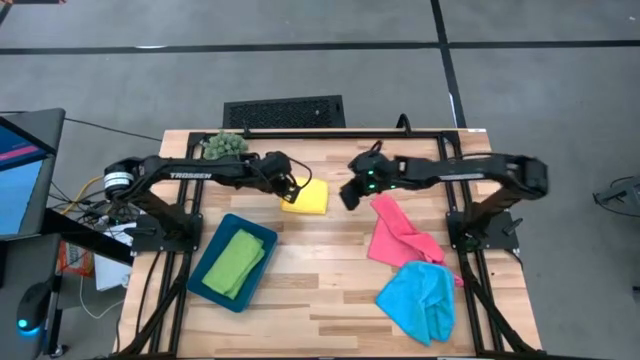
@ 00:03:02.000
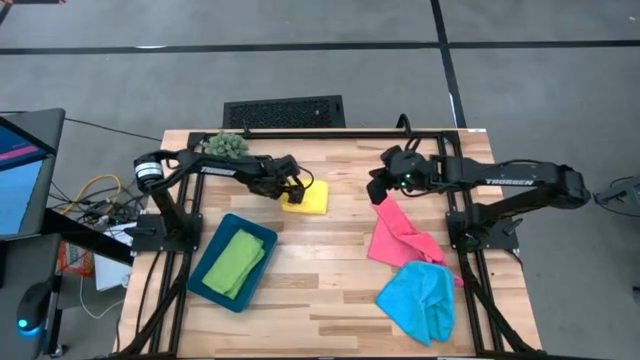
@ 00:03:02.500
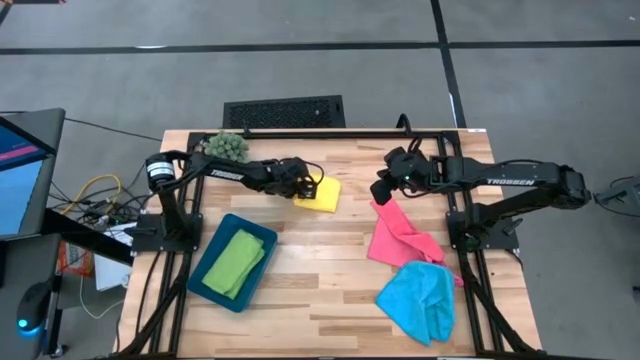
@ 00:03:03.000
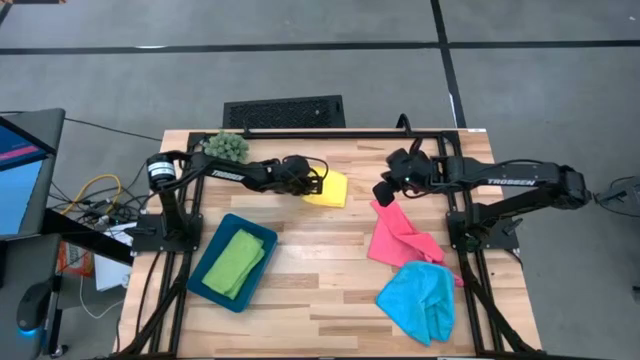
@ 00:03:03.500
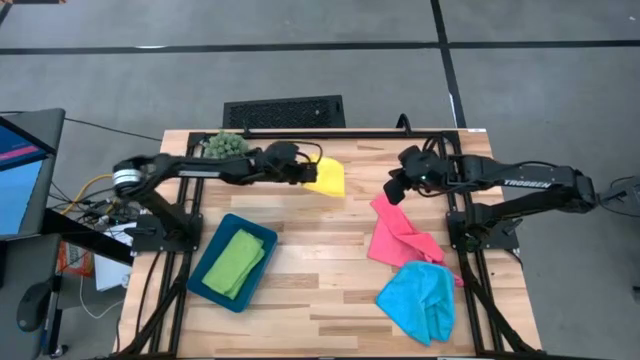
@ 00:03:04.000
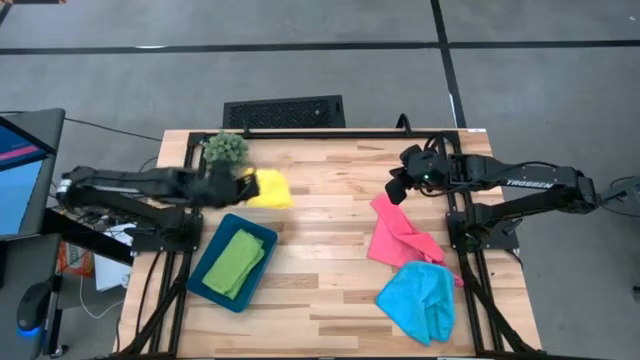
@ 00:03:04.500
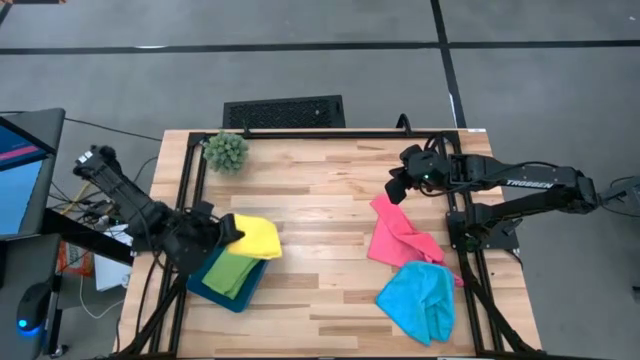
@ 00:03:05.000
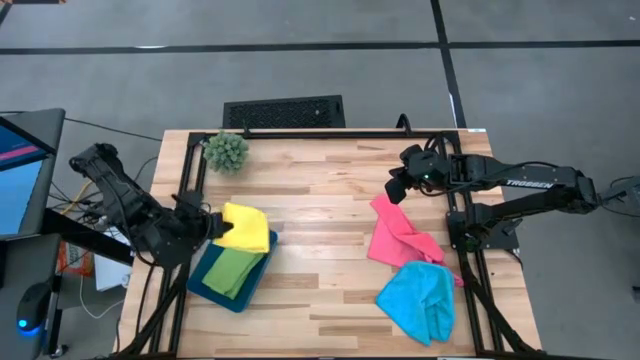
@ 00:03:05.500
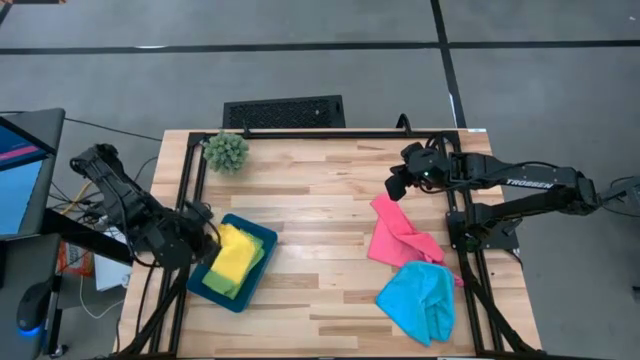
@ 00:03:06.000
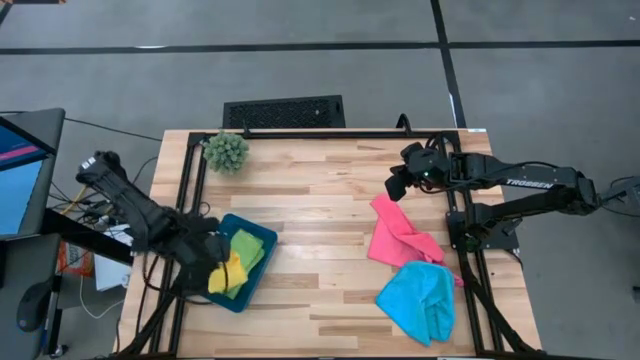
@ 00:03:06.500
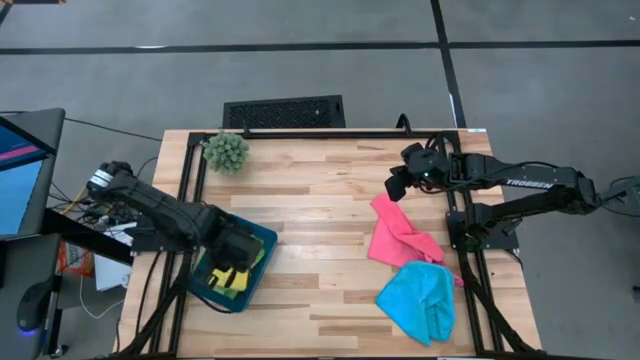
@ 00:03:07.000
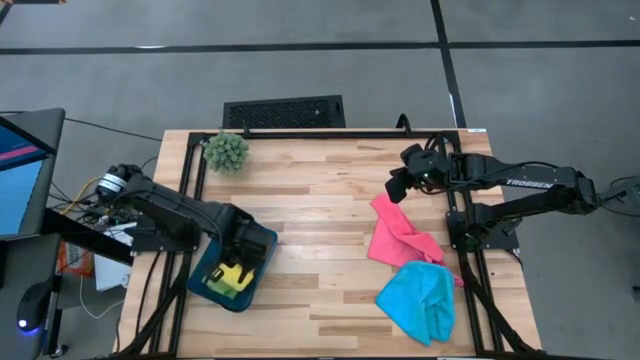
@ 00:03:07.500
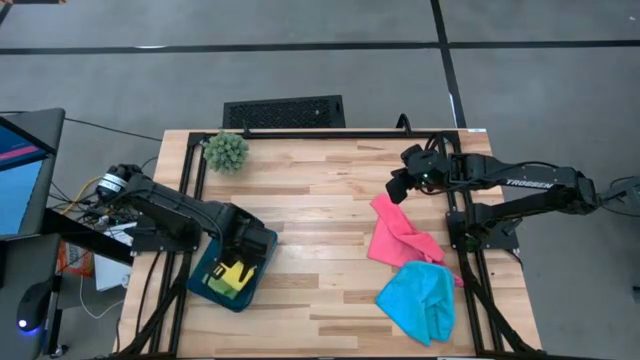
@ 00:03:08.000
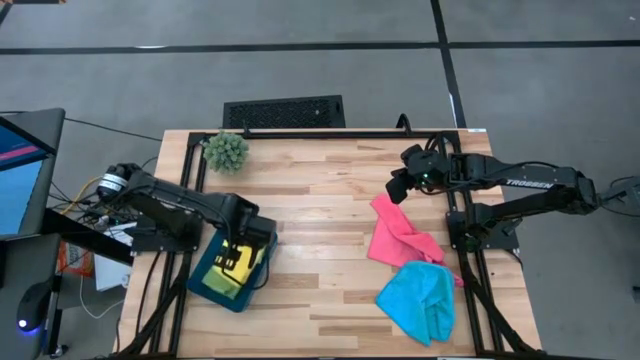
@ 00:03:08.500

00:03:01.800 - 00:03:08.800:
Task: Fold microfiber towels
Put the yellow microfiber towel into the blue bin

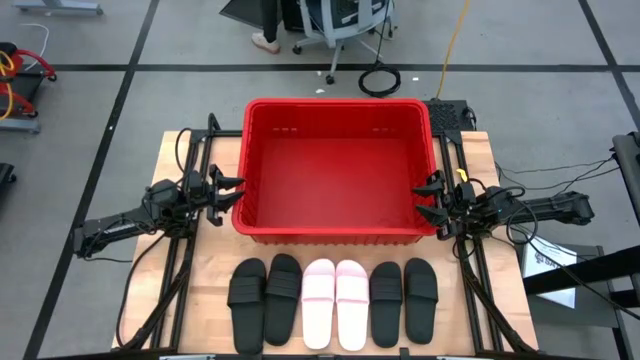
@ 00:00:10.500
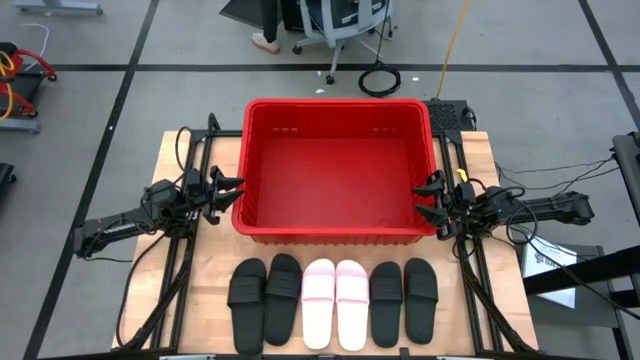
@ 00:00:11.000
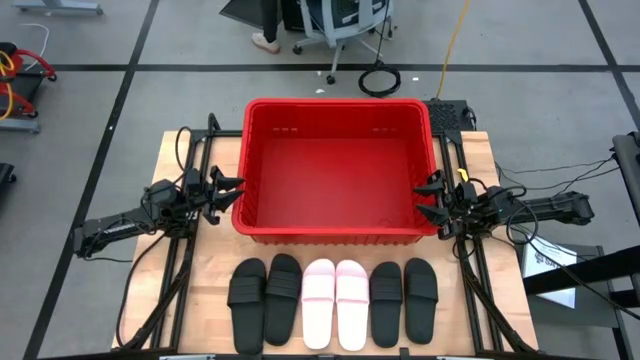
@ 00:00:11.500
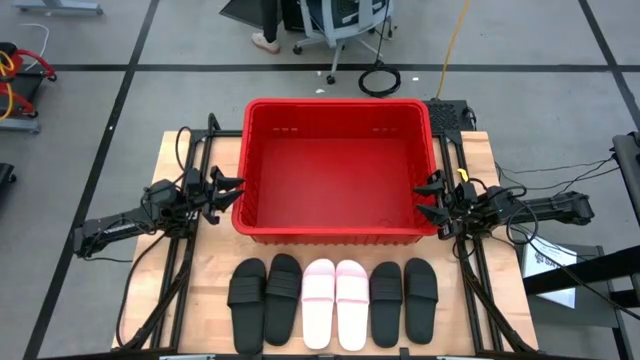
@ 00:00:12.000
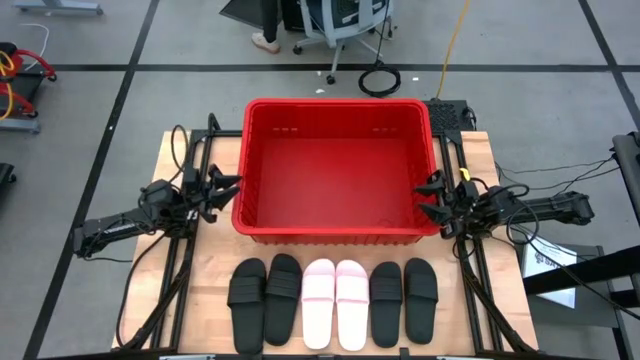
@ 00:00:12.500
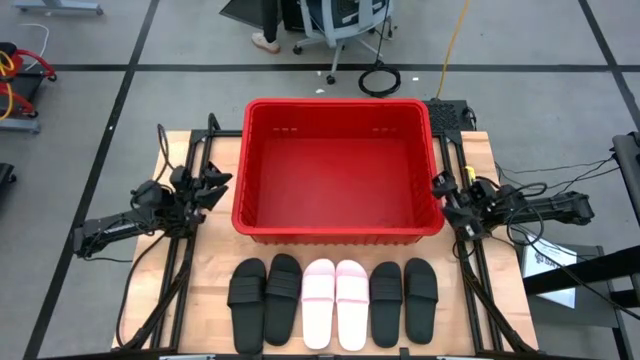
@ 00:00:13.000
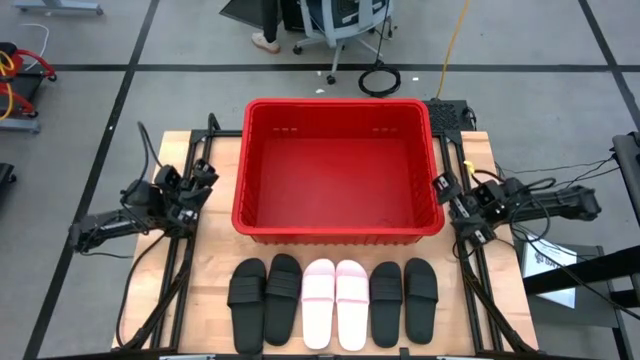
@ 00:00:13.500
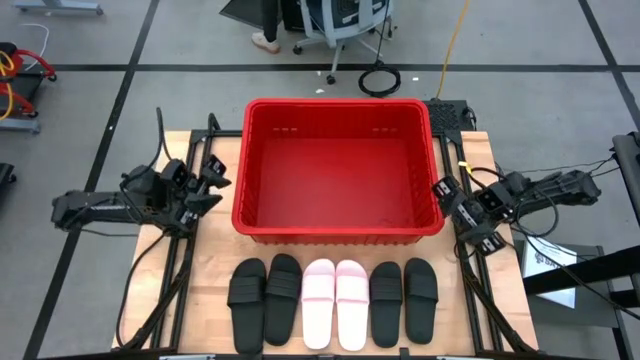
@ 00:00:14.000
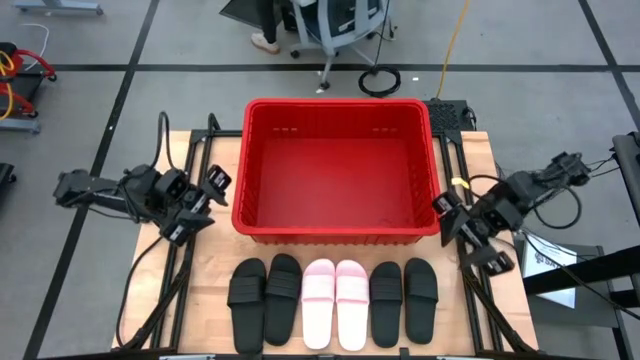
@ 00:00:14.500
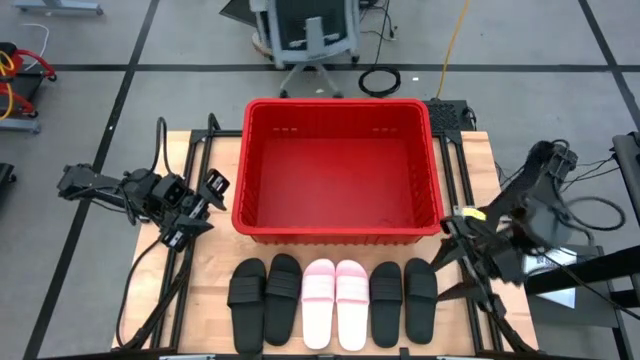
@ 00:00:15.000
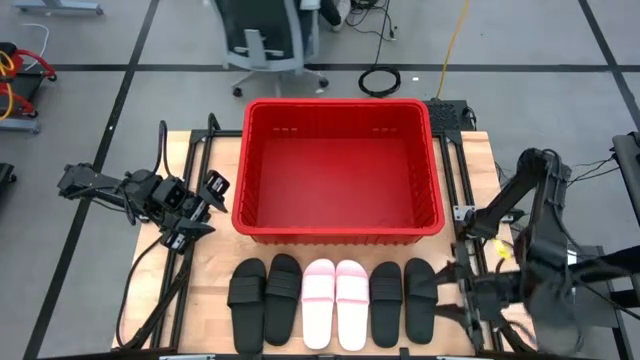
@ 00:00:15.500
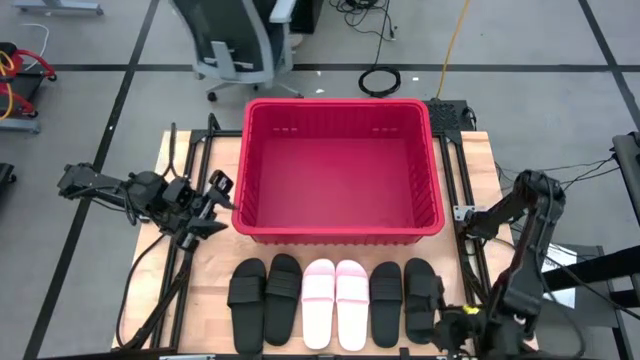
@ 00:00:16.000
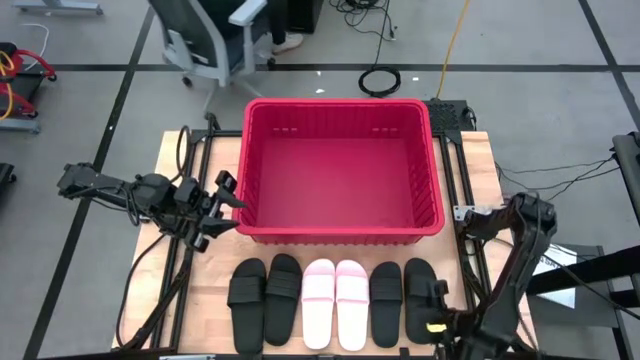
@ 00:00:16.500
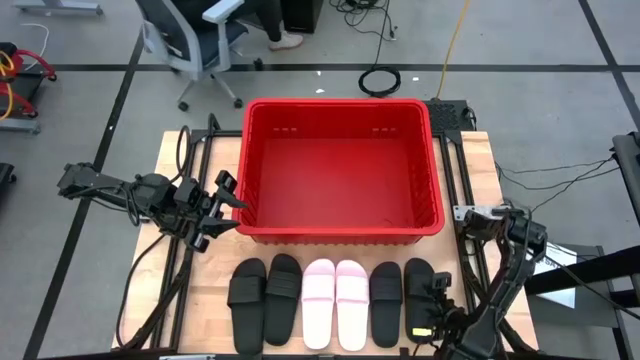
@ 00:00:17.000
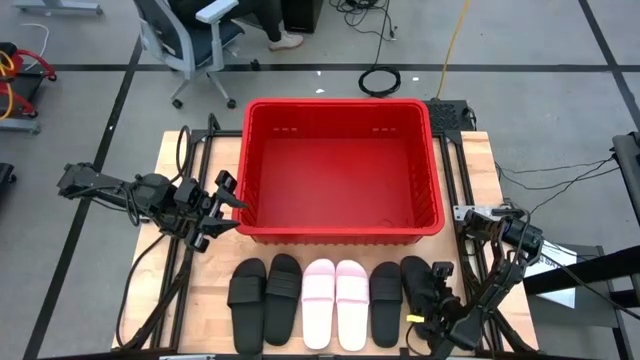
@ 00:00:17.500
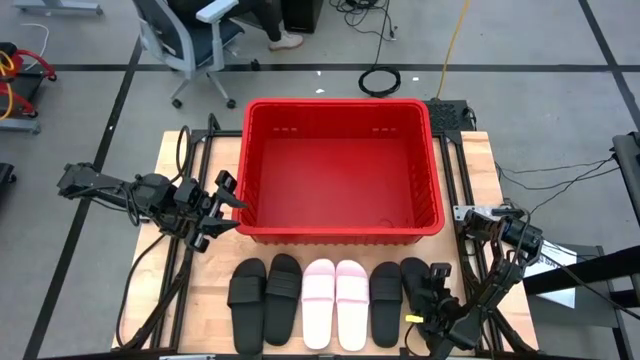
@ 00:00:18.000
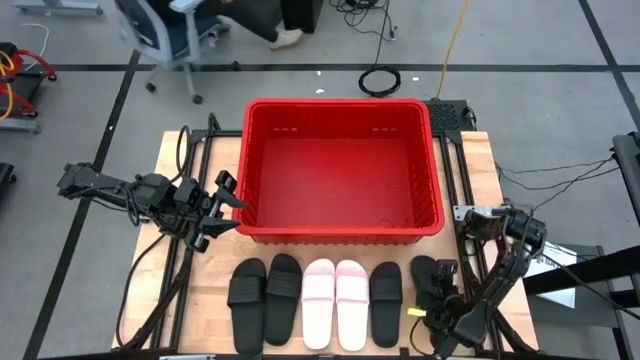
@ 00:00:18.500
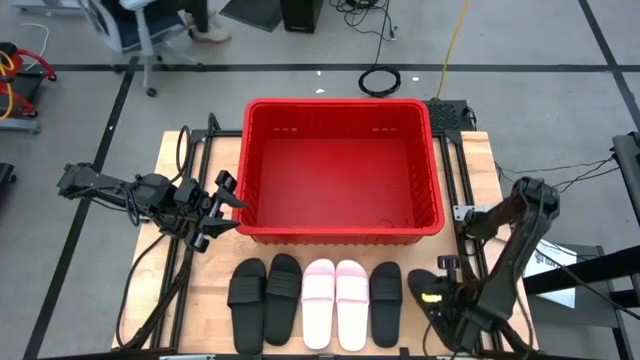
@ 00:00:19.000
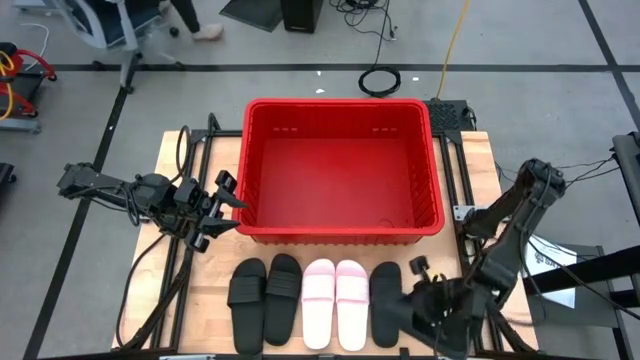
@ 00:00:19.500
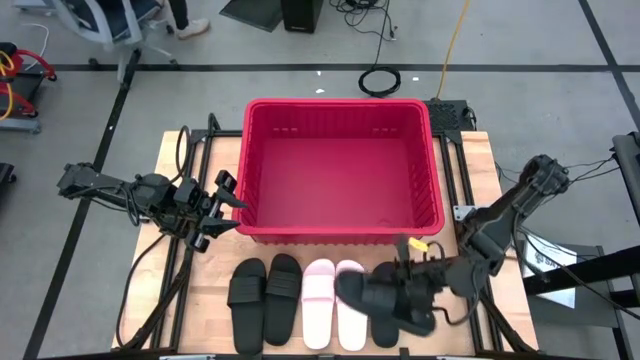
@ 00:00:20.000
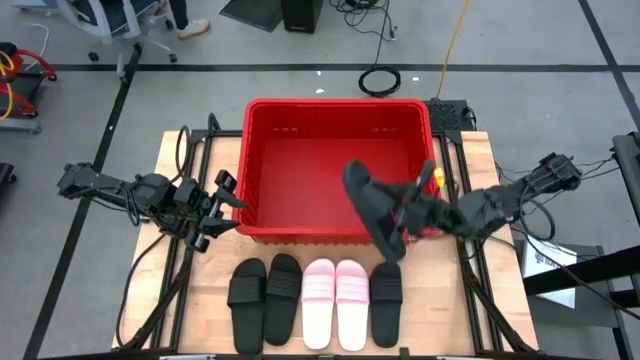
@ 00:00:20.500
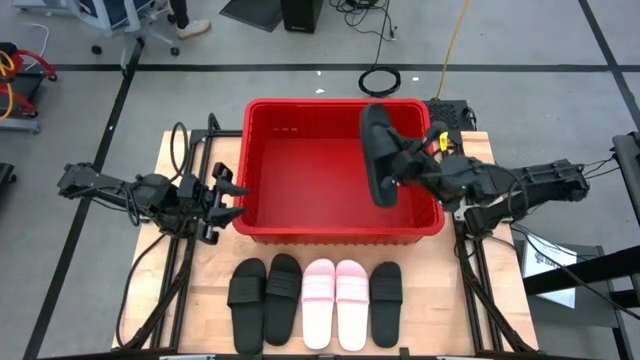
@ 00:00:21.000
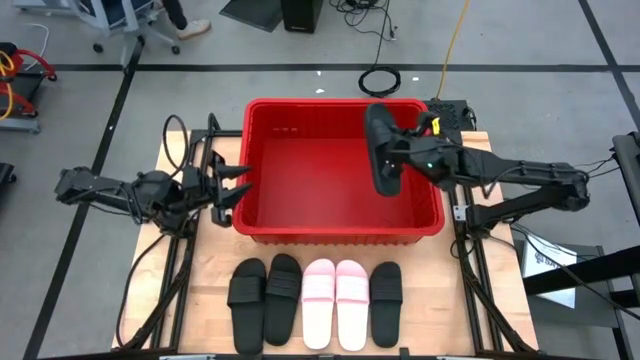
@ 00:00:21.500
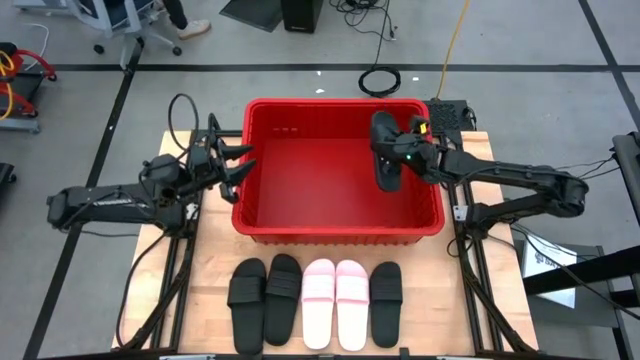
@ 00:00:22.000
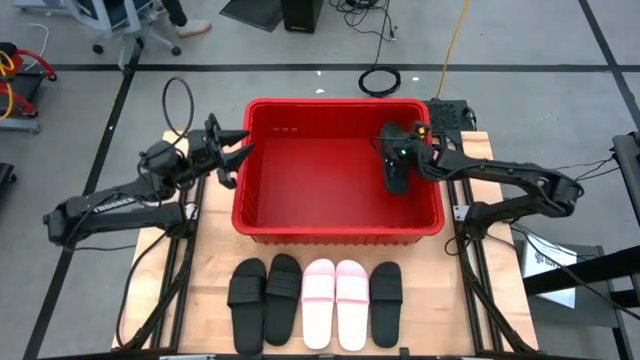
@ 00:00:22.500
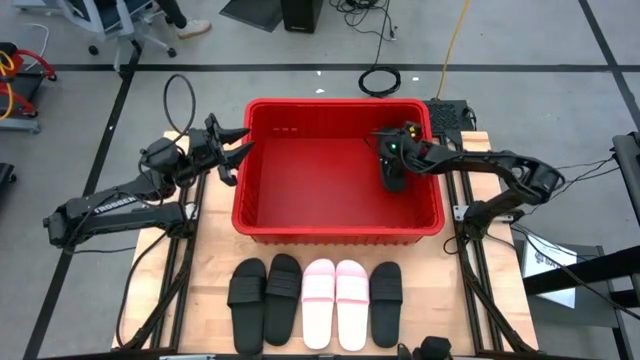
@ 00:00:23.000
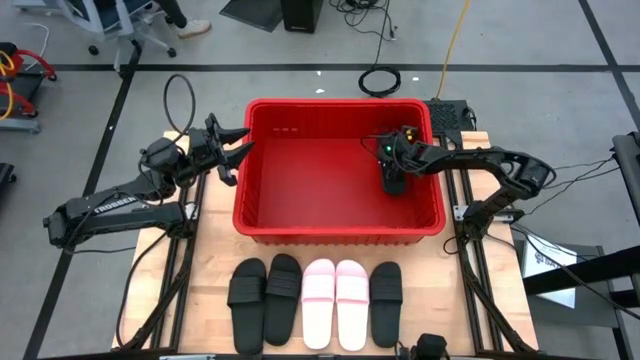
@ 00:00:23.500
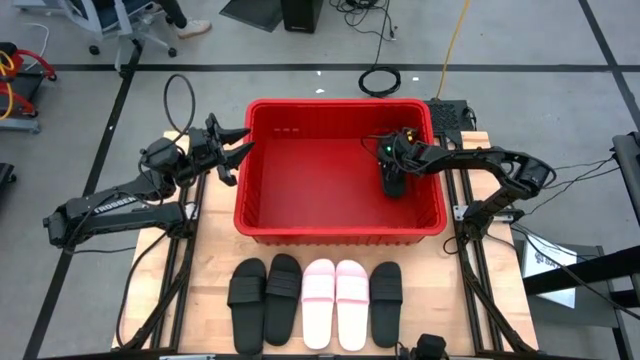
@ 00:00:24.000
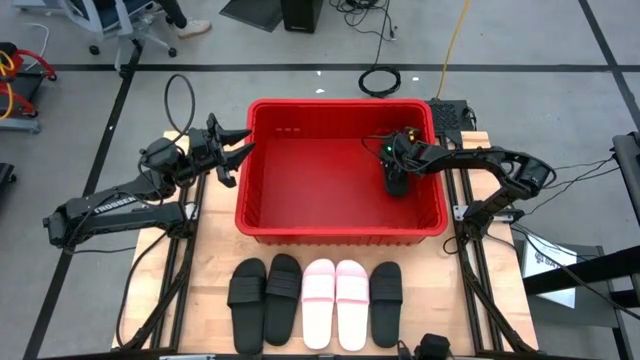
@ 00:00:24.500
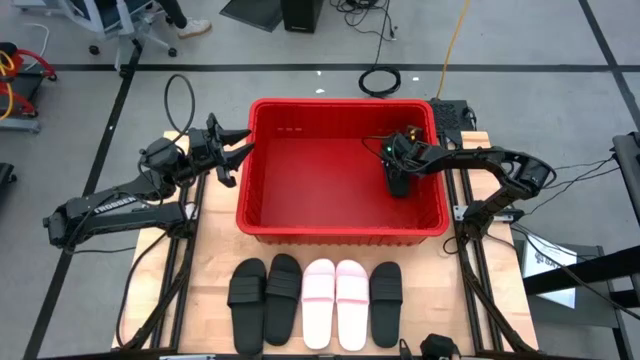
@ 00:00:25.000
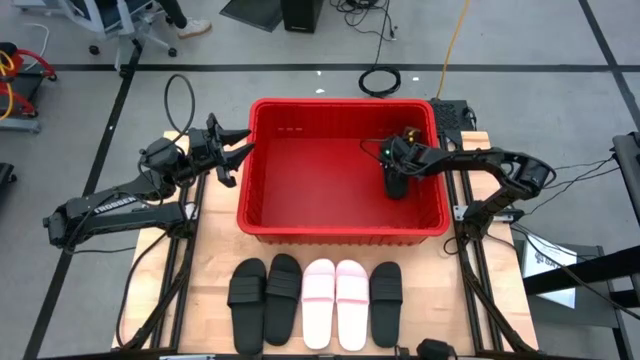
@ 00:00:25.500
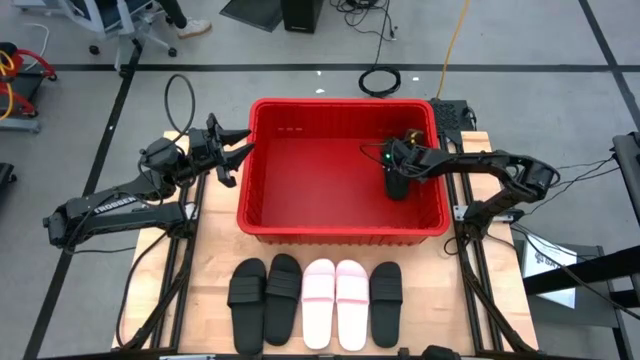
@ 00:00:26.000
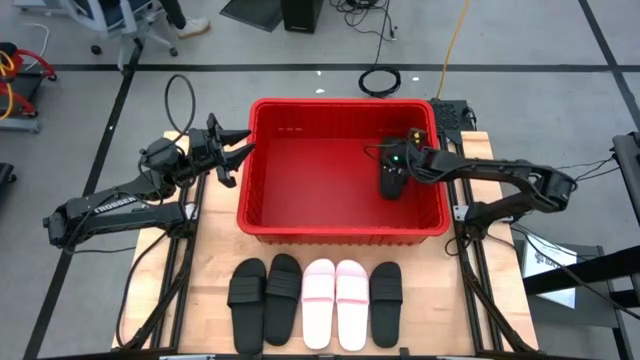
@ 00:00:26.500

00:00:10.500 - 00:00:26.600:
Task: Pick and place slides into bin
Put the black slipper into the red container
